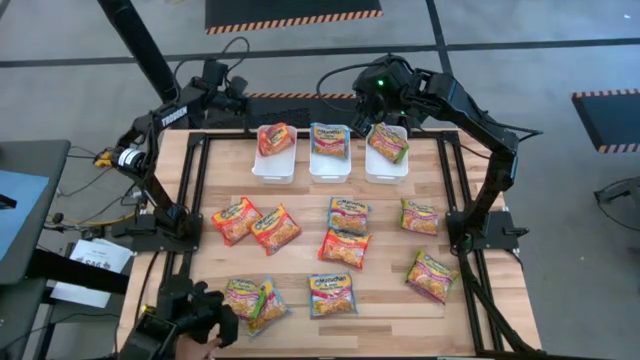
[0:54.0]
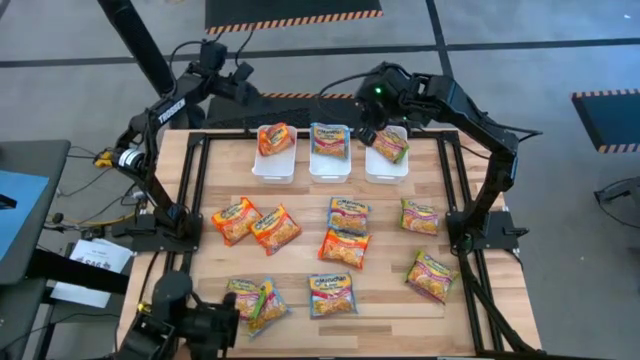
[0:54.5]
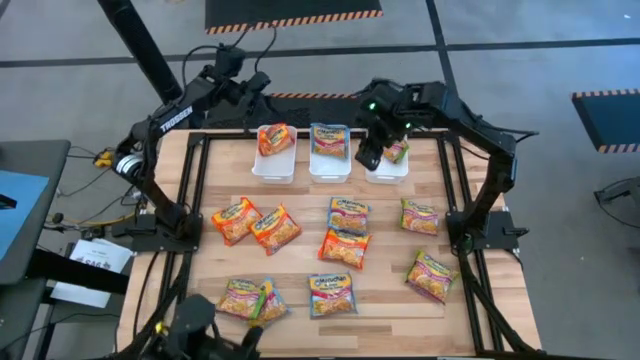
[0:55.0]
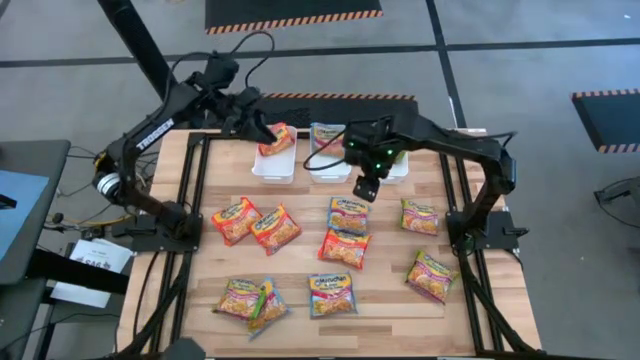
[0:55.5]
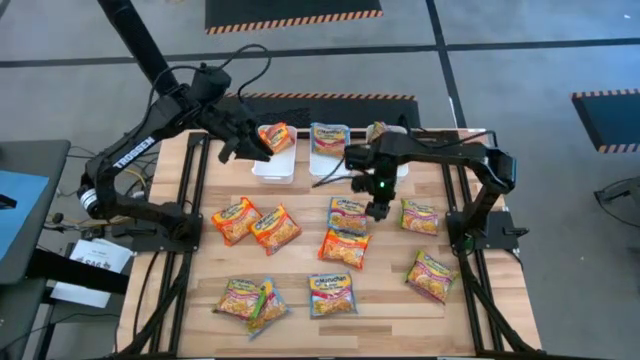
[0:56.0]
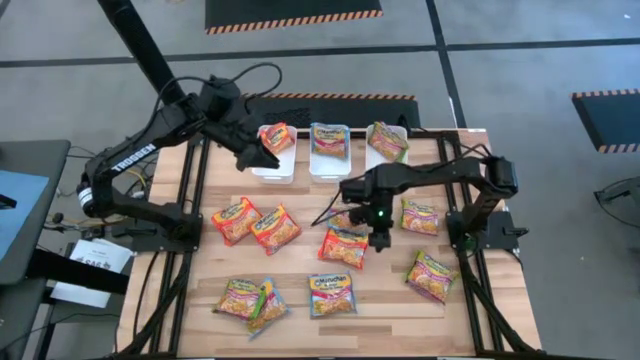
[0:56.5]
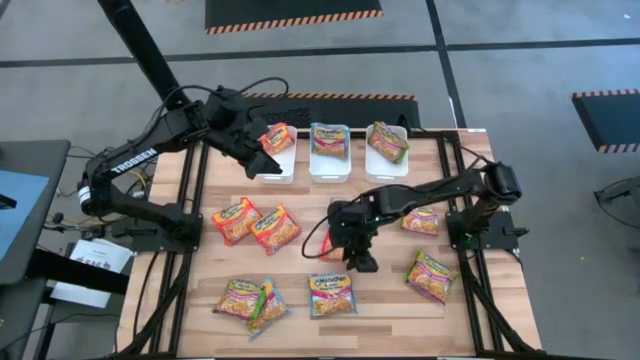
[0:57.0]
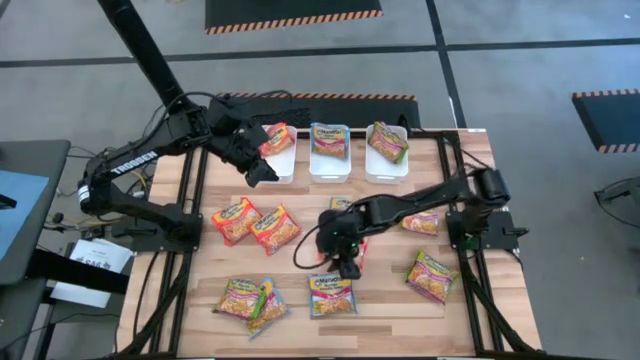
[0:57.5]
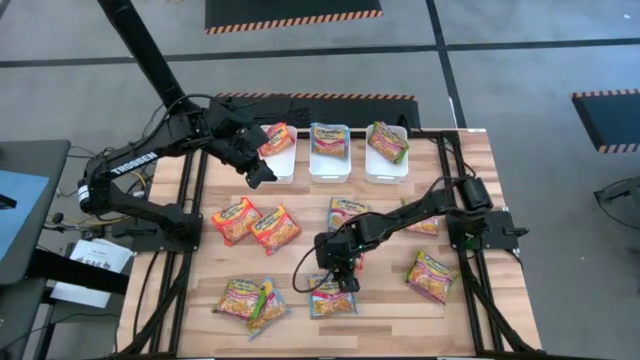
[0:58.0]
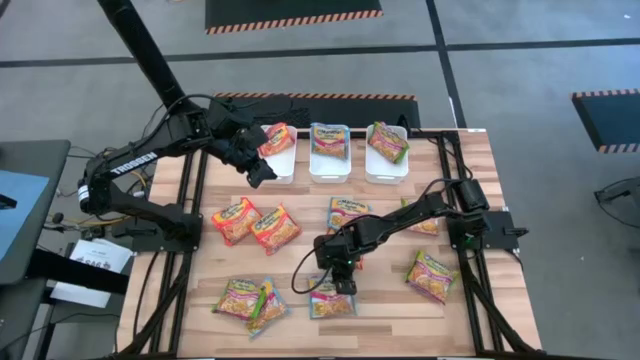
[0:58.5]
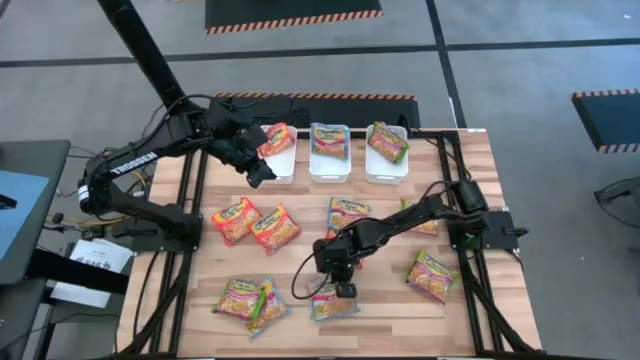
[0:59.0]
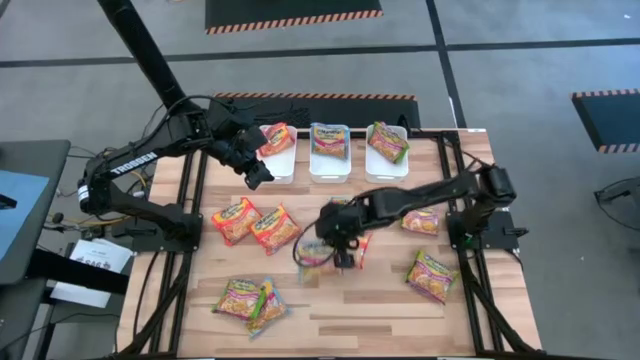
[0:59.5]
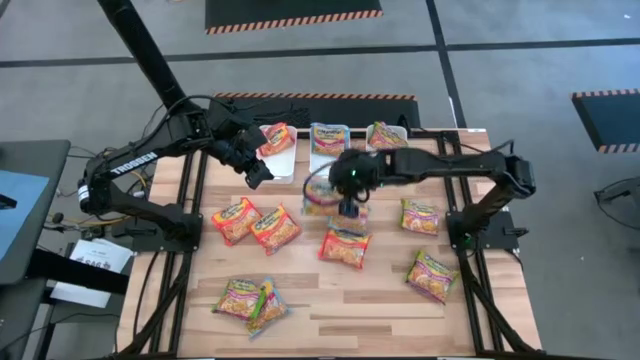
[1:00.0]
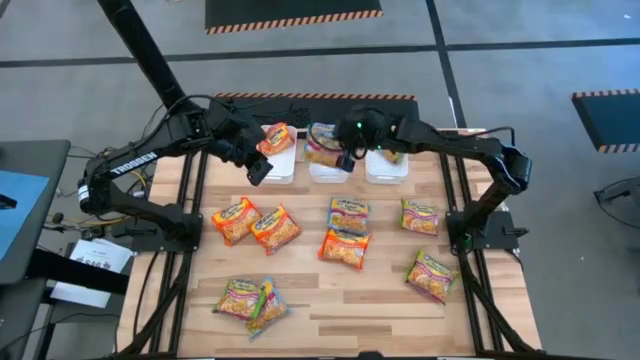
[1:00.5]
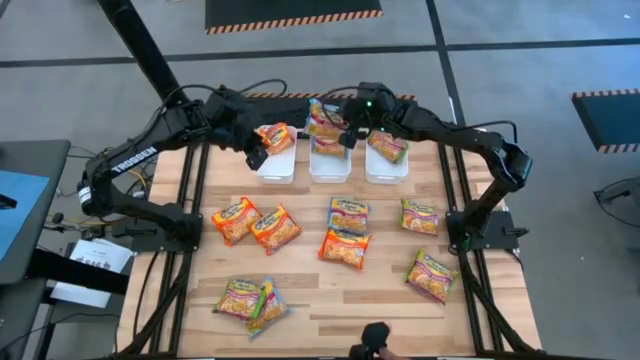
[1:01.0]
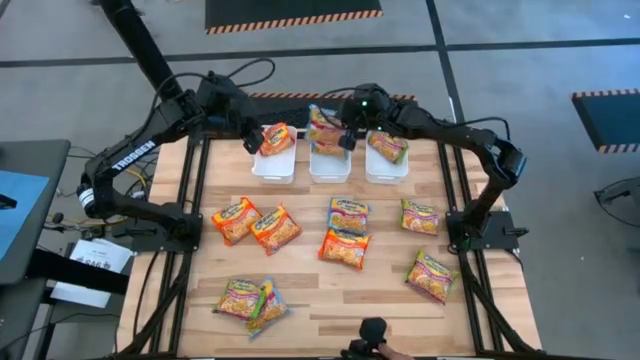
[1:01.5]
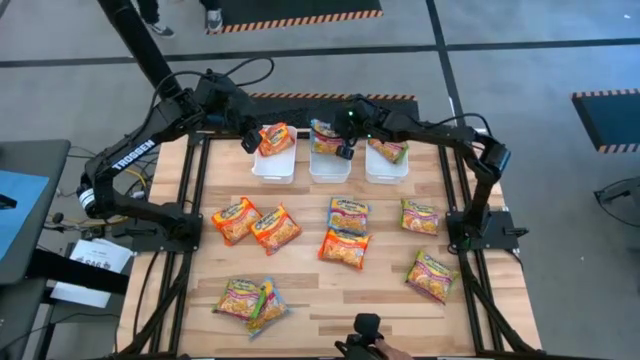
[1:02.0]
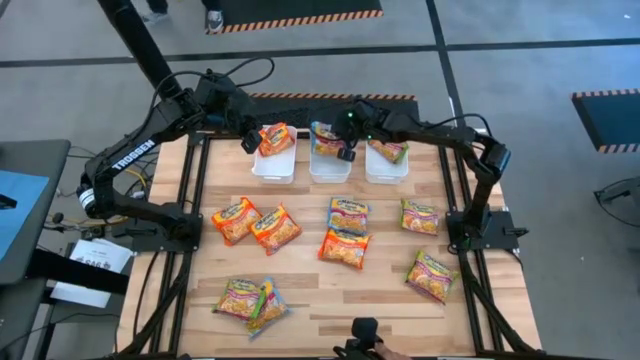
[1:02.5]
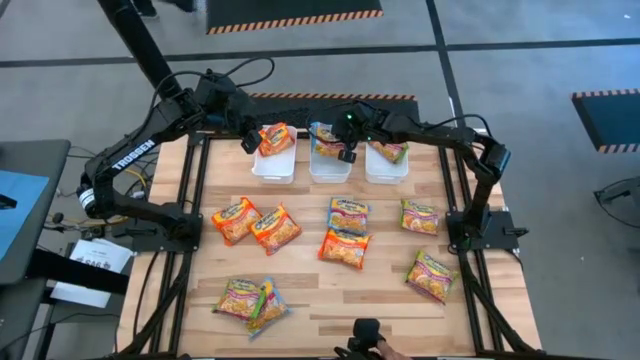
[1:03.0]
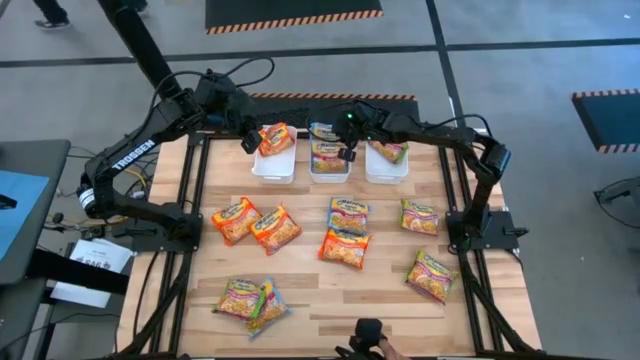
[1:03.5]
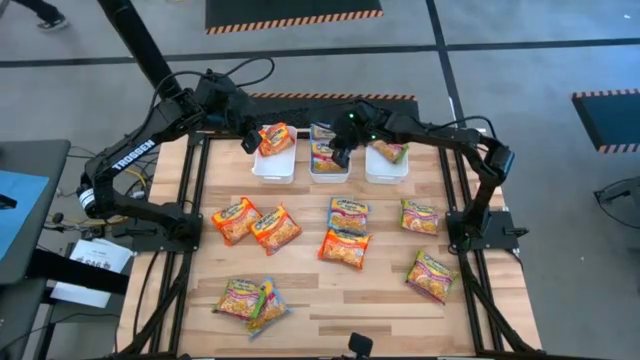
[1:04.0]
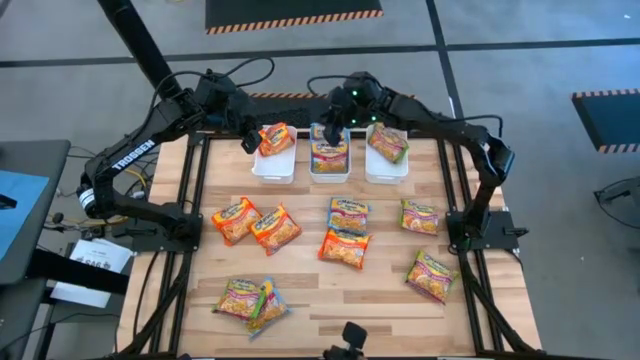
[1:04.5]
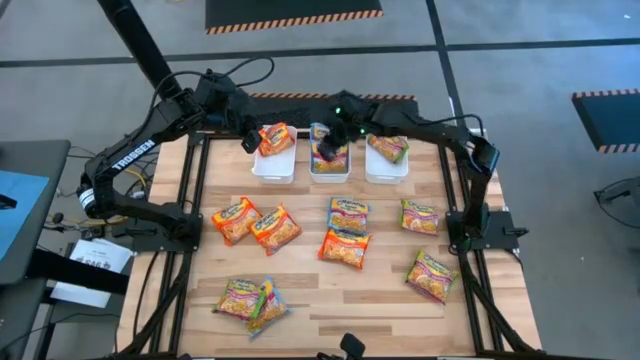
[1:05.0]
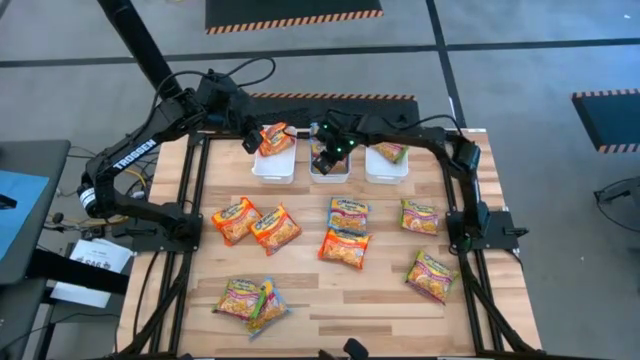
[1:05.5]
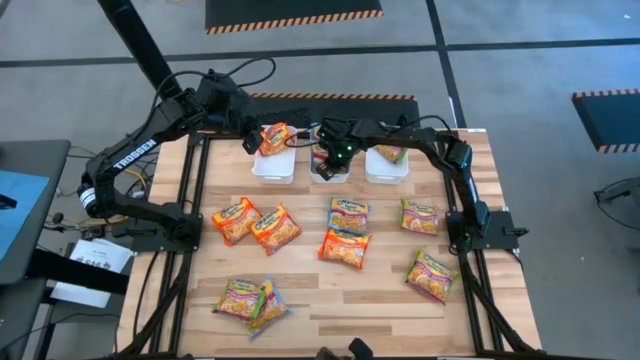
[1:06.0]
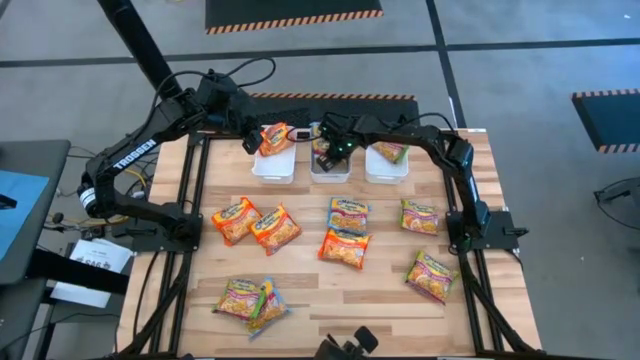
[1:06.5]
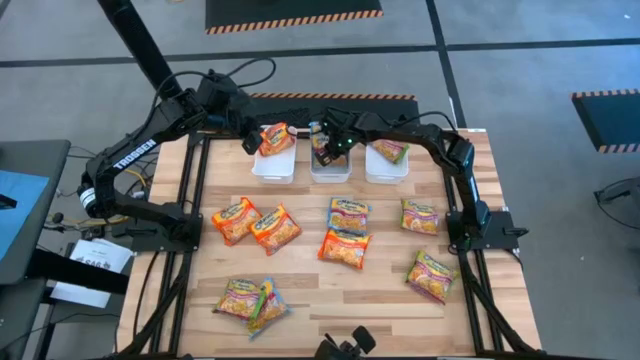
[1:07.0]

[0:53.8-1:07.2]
Task: Sort Maruchan noodles
Put the blue noodle pack into the center white bin

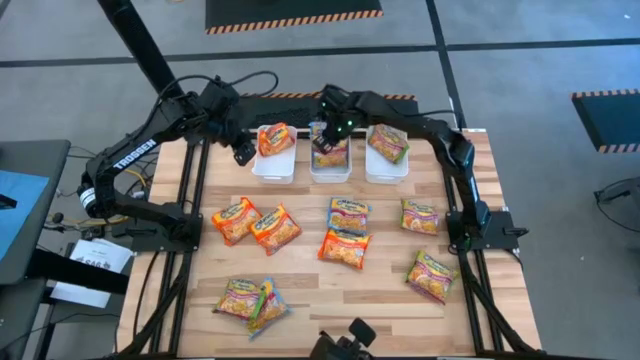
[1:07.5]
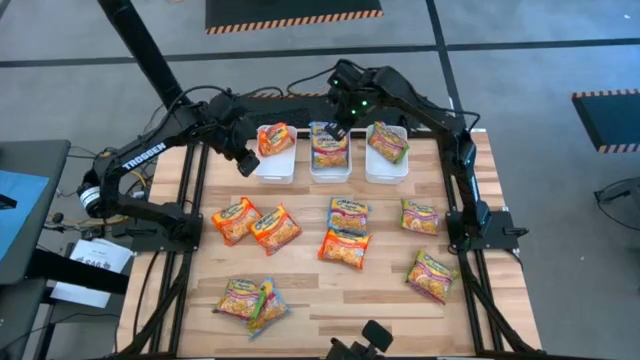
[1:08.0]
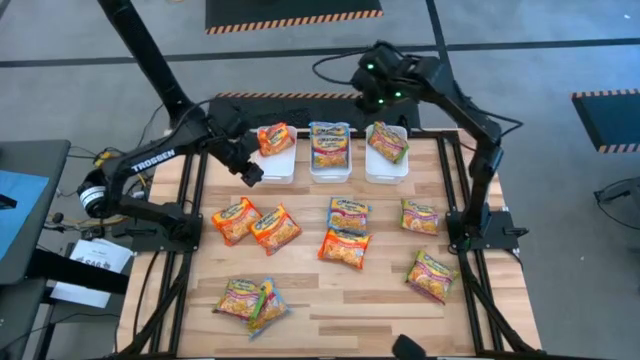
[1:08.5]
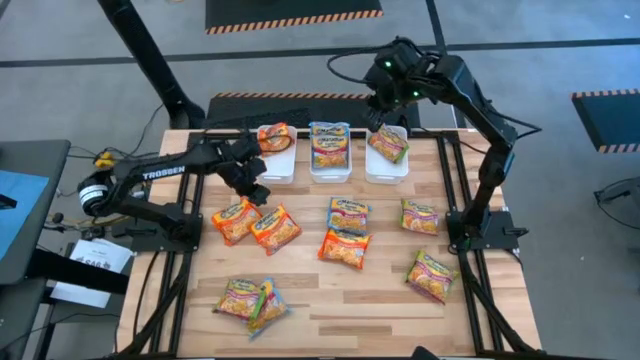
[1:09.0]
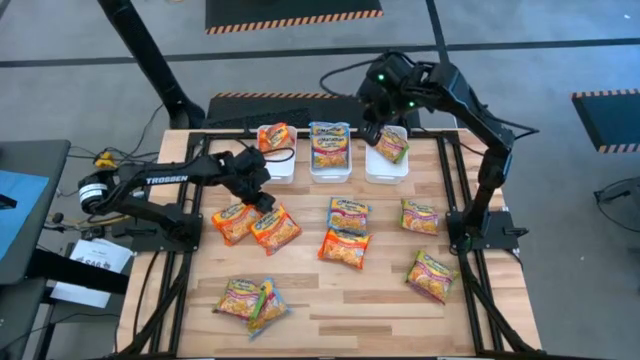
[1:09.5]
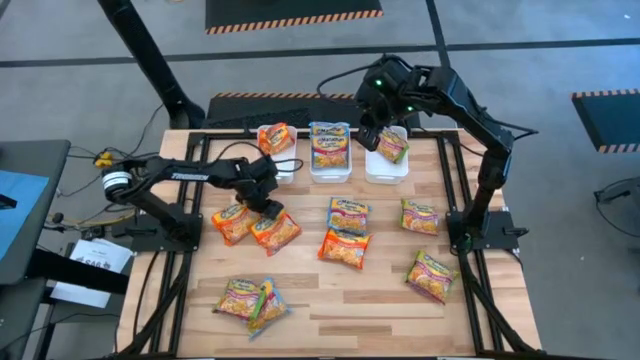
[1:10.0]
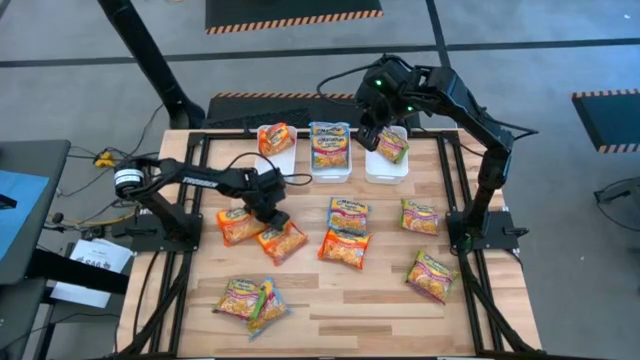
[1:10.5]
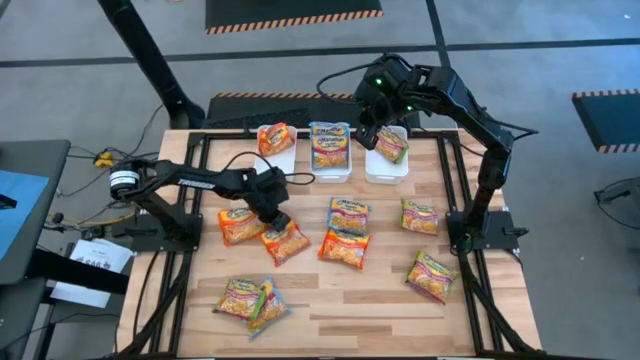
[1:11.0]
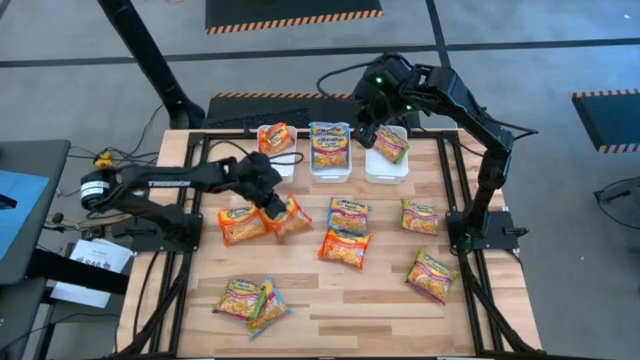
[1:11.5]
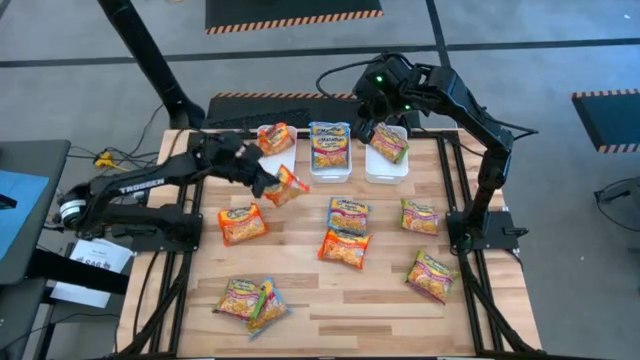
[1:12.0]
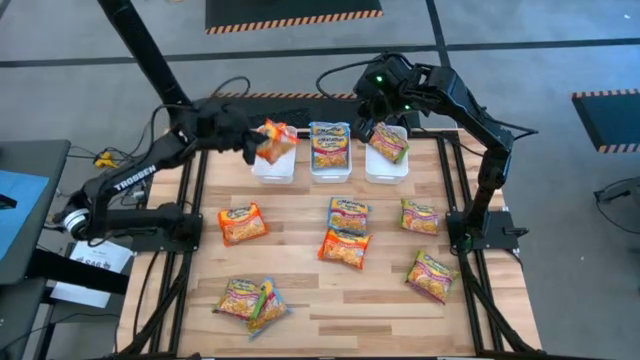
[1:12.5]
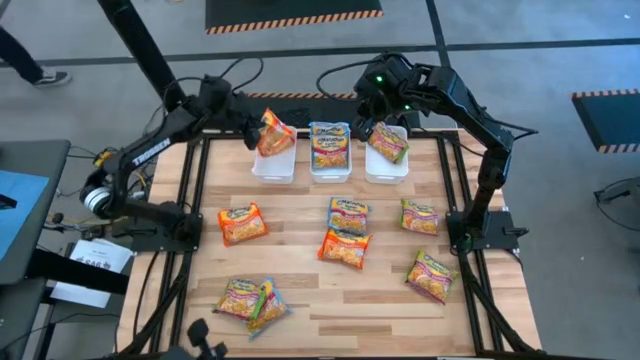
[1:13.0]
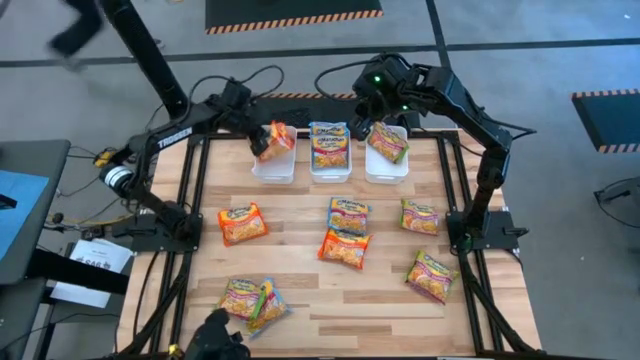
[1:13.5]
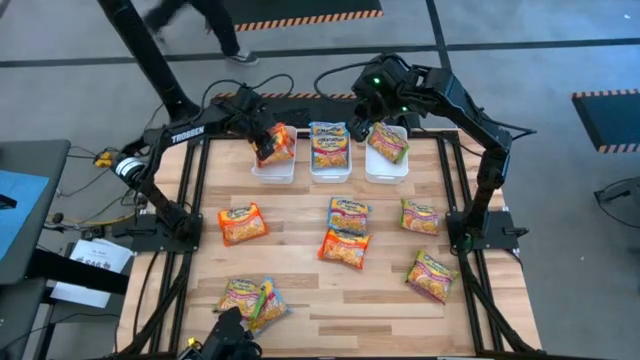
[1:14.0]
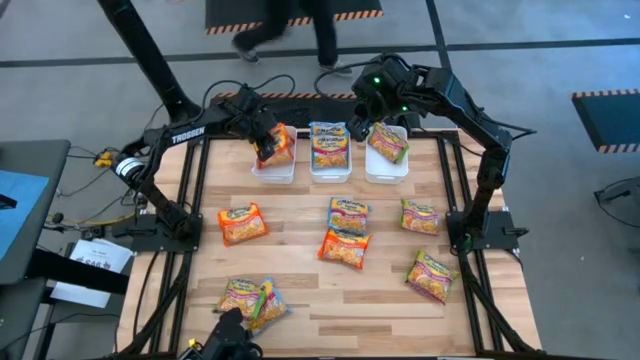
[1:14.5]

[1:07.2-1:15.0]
Put the orange noodle pack into the left white bin

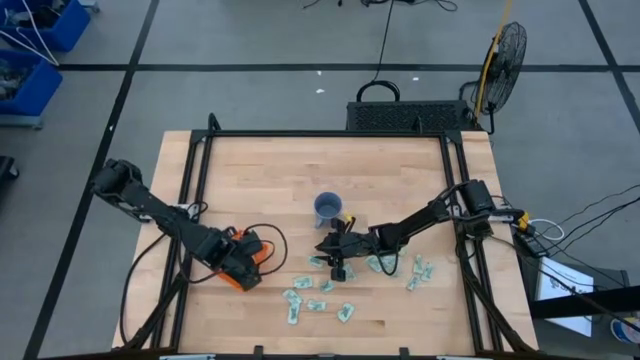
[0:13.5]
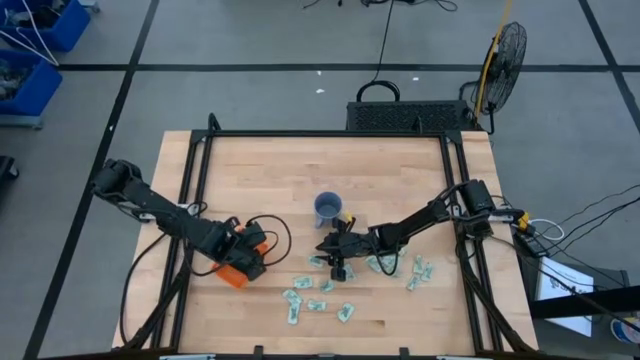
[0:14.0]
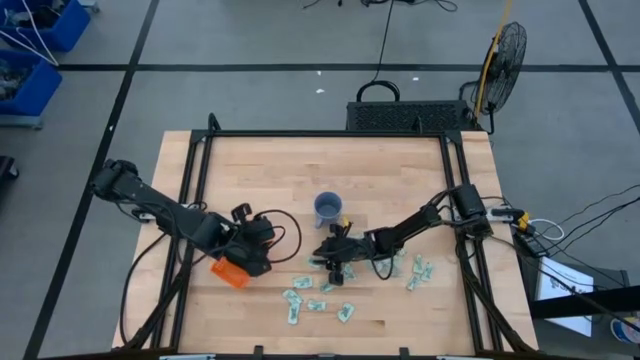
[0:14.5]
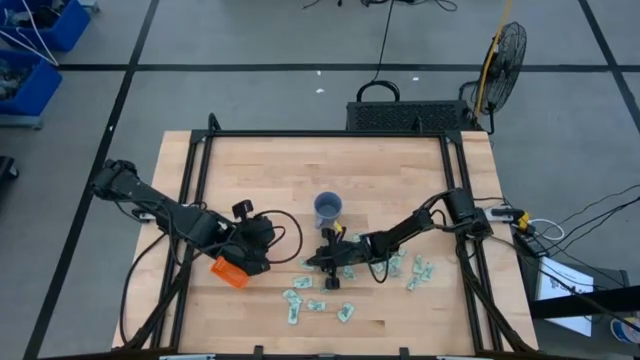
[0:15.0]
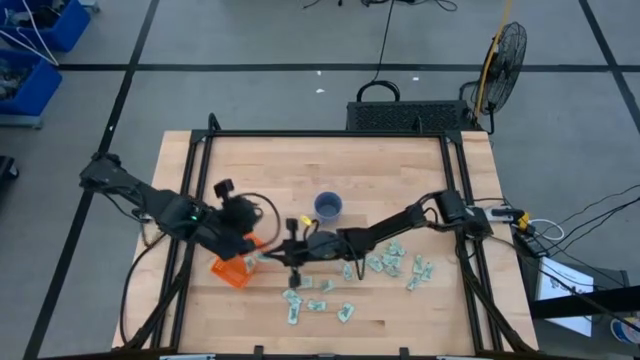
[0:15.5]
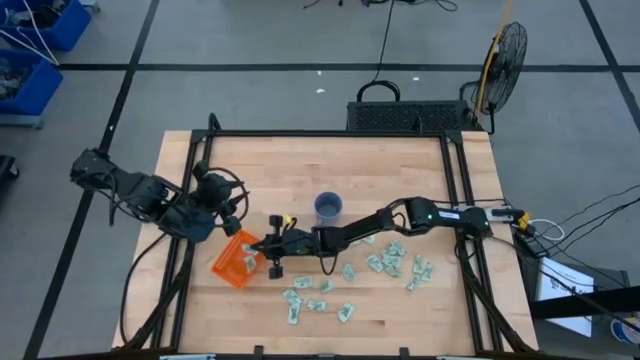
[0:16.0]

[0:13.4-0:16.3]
Task: Pick and place Stevia / Truvia into bins
Put the green stevia packet into the orange basket
